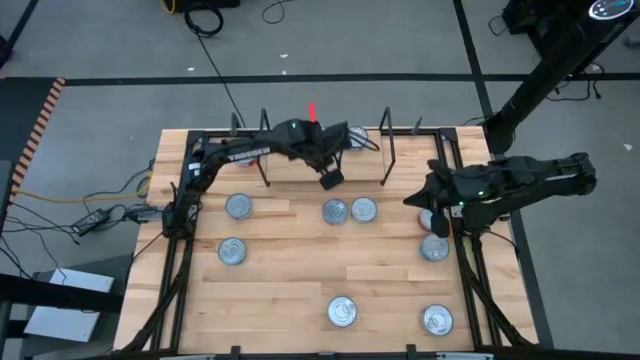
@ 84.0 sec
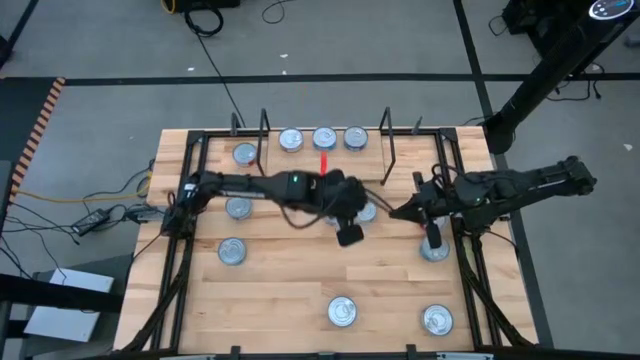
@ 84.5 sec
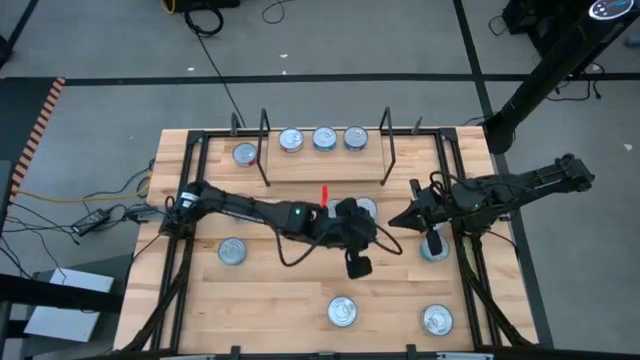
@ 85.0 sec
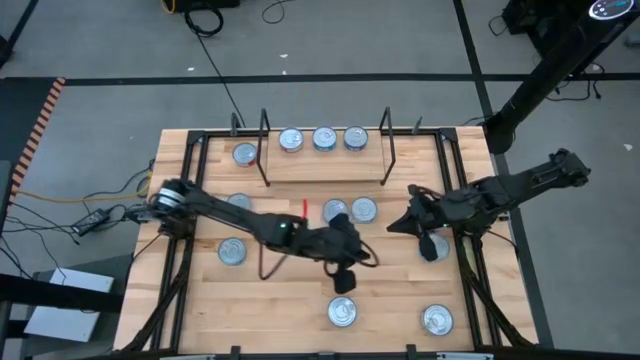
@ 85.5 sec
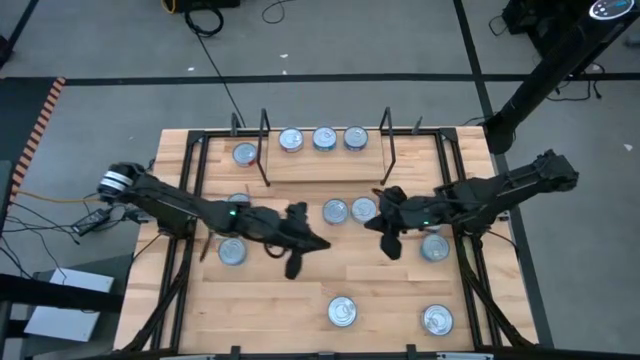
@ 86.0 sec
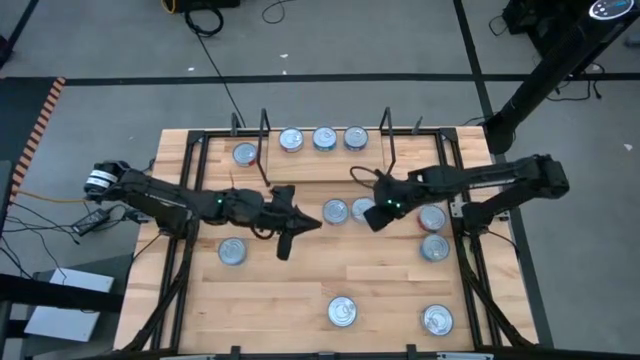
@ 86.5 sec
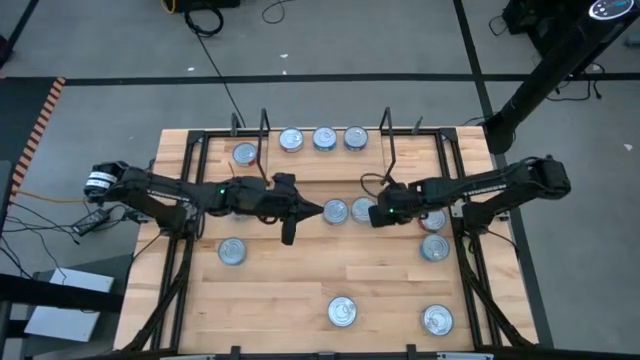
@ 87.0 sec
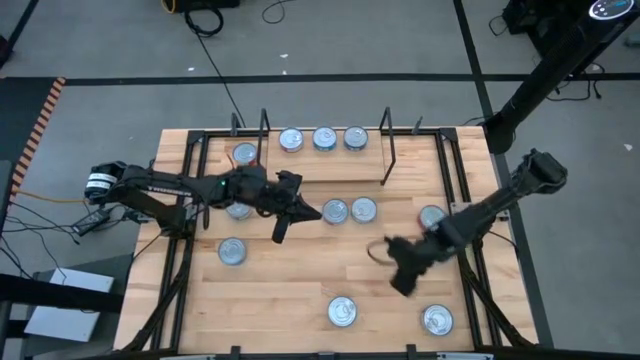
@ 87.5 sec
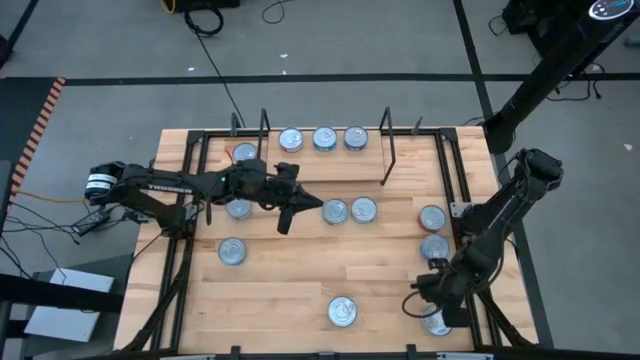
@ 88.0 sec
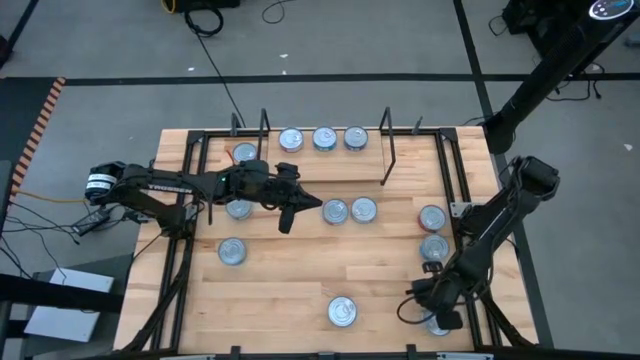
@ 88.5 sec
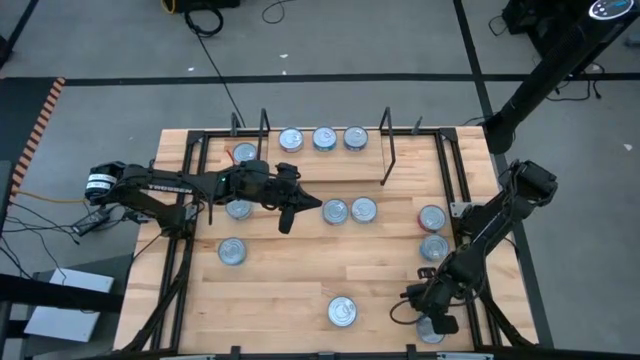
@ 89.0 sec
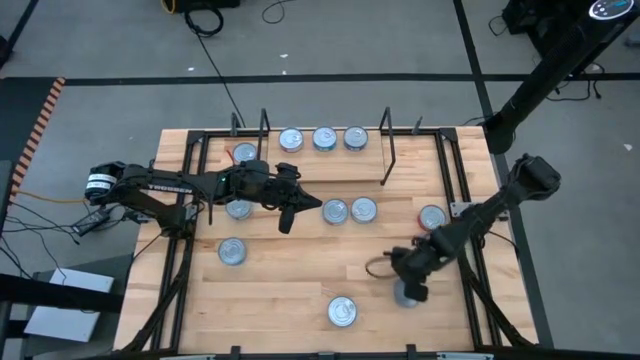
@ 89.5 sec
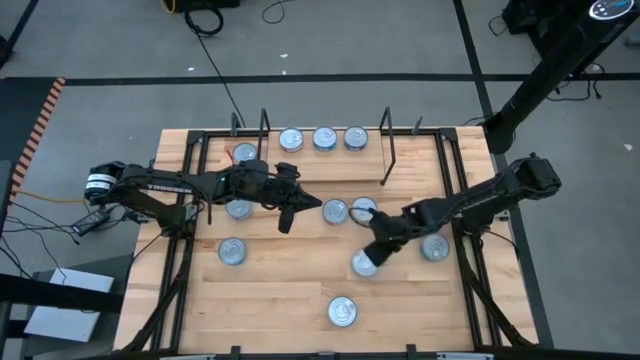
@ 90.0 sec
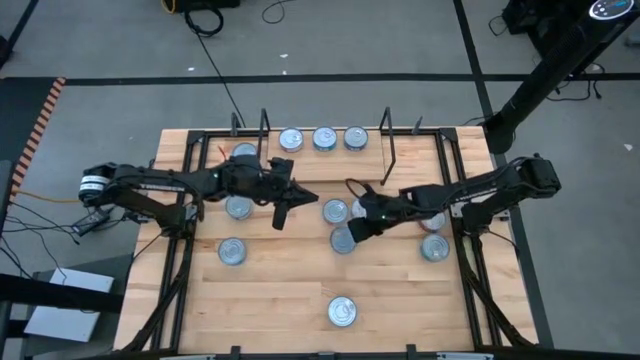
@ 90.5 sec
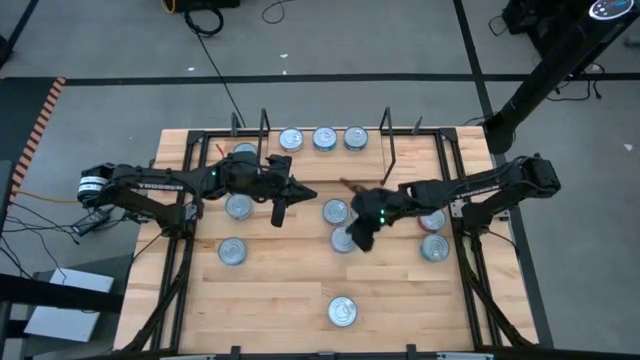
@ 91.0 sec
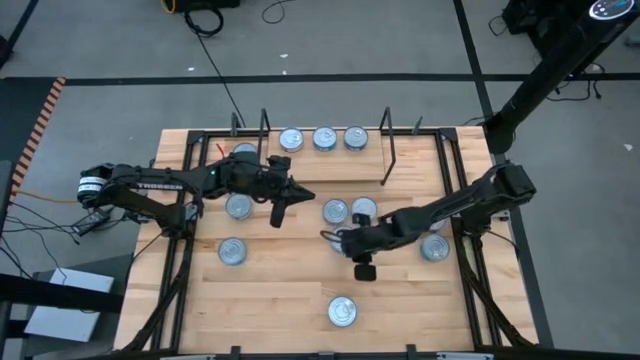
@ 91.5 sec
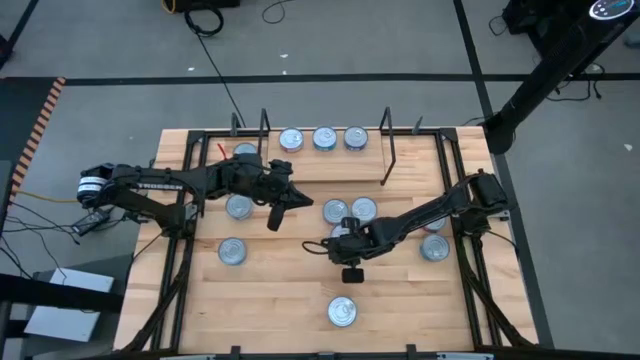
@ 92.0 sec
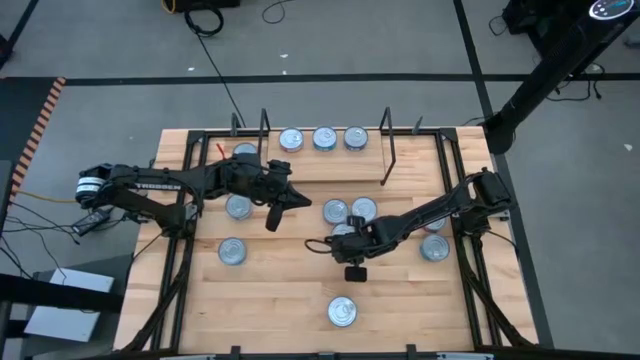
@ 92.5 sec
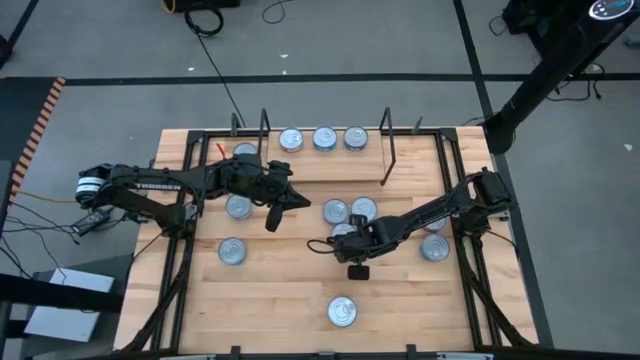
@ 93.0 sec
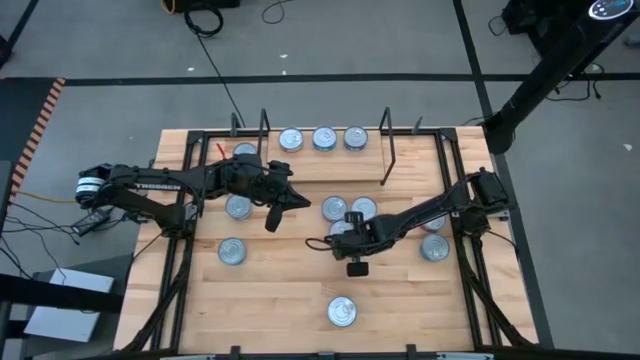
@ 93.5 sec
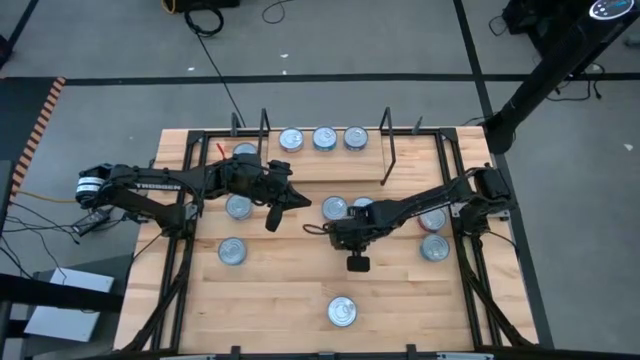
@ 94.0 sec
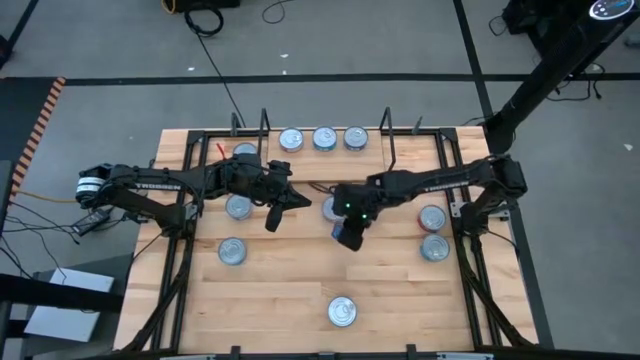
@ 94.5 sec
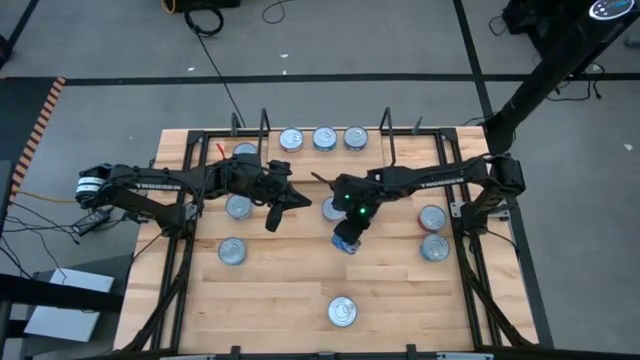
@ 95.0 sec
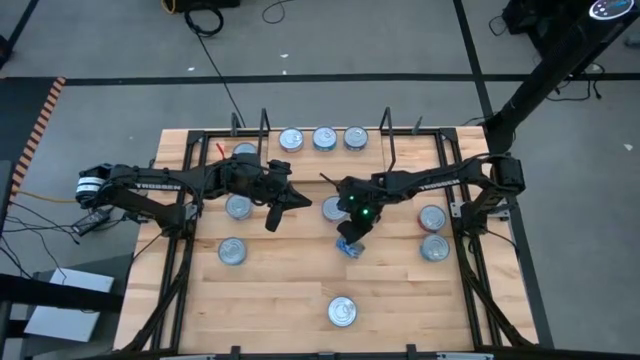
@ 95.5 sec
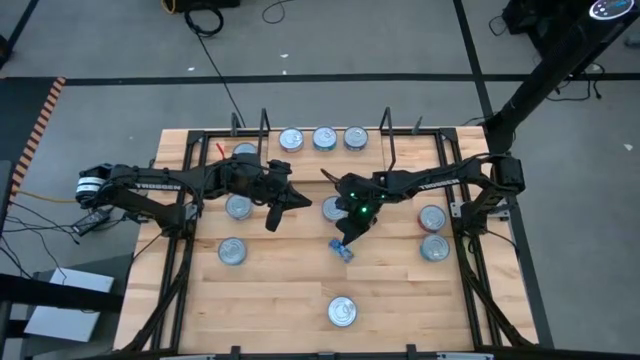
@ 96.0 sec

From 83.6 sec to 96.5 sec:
Task: Stack canned seafood by type on shelf
Put the blue tuna can on the shelf

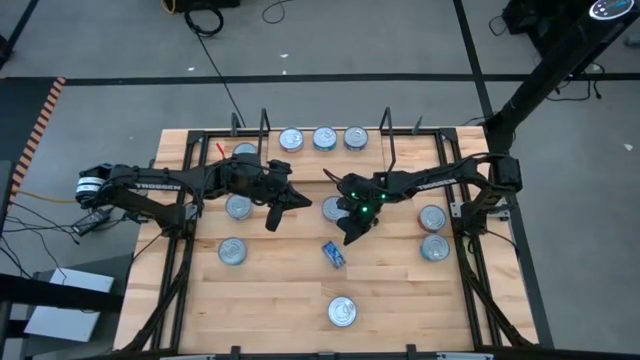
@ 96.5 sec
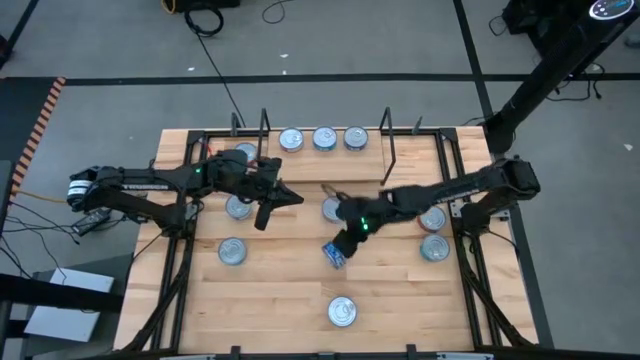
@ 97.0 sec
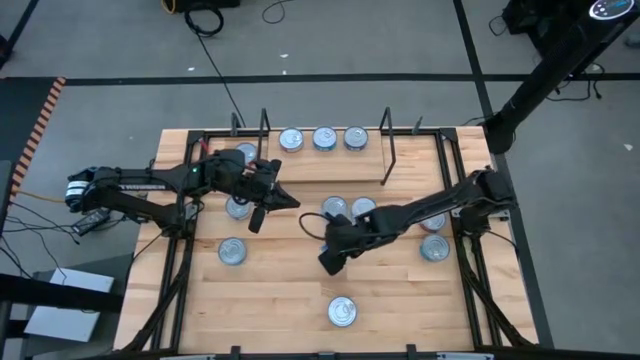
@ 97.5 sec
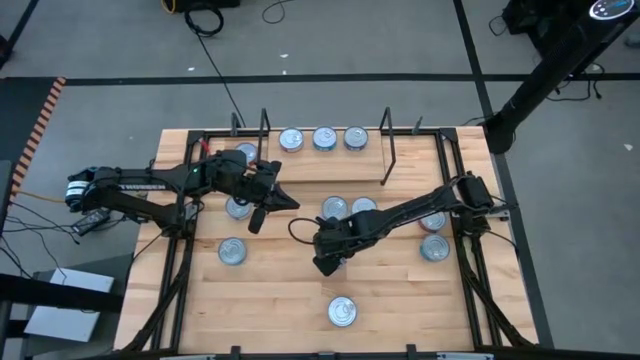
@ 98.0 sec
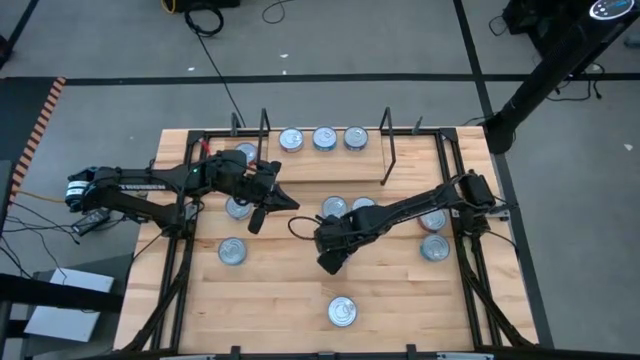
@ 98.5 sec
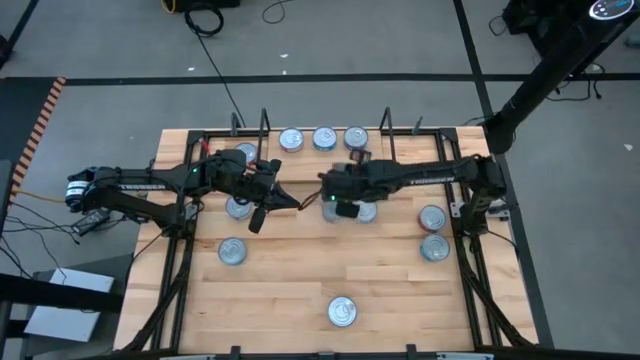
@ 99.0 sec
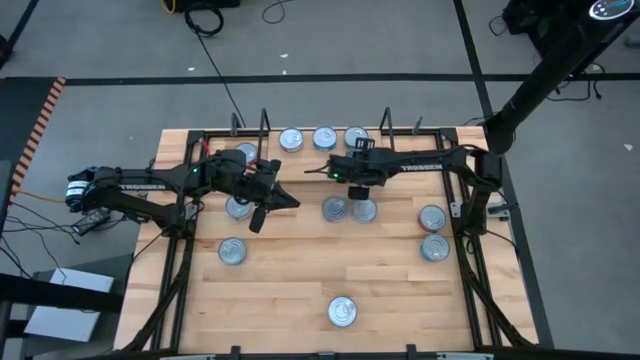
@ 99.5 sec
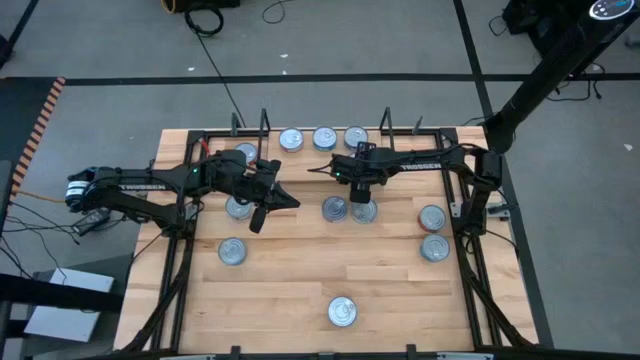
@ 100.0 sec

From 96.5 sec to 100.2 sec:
Put the blue tuna can on the shelf

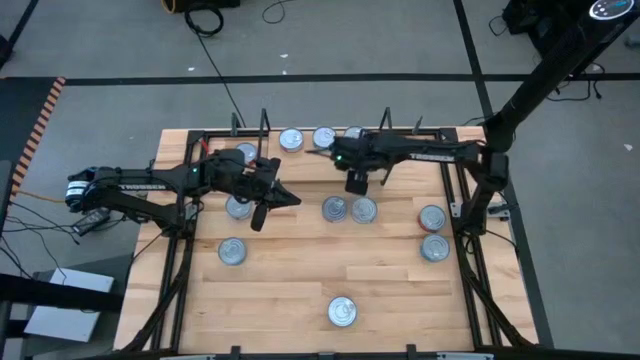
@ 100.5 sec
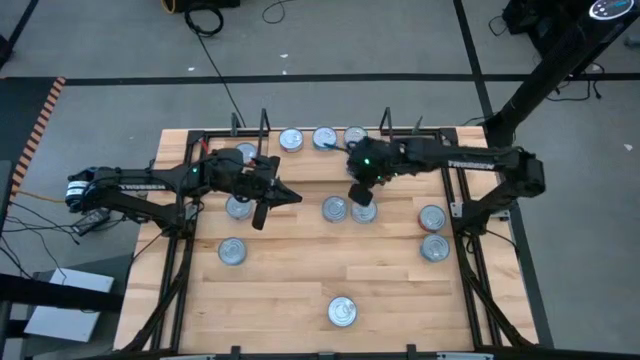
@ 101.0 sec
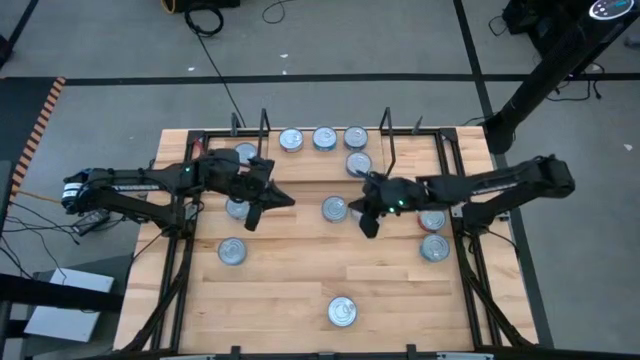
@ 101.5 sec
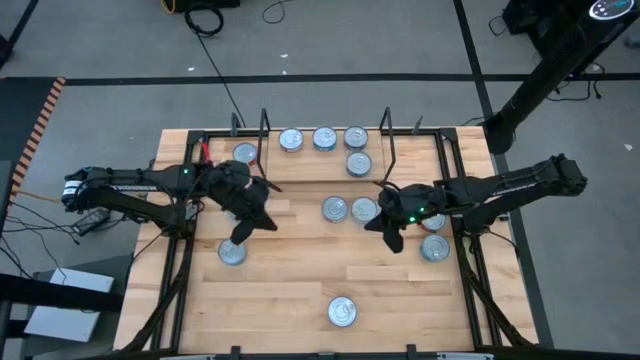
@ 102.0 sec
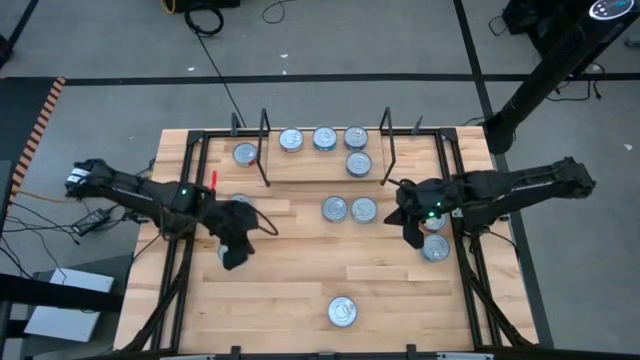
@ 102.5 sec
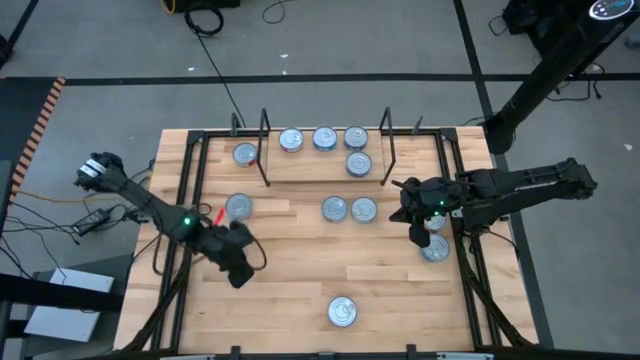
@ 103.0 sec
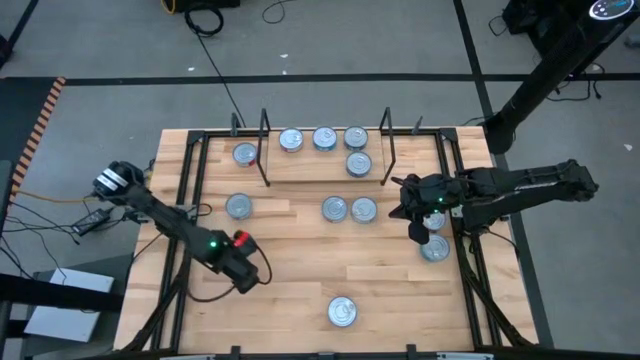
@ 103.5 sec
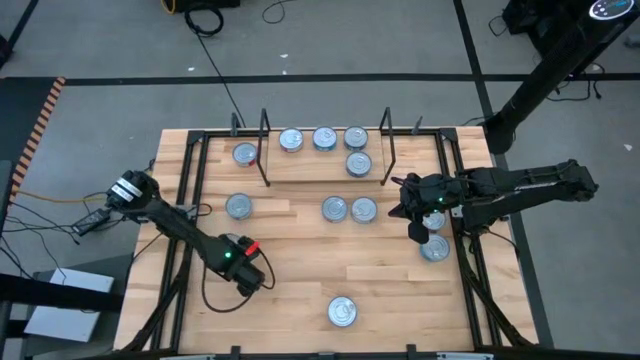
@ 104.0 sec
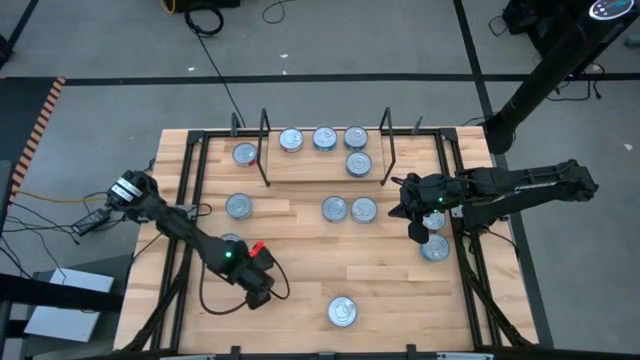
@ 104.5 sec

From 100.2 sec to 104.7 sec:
Put the light blue tuna can on the shelf

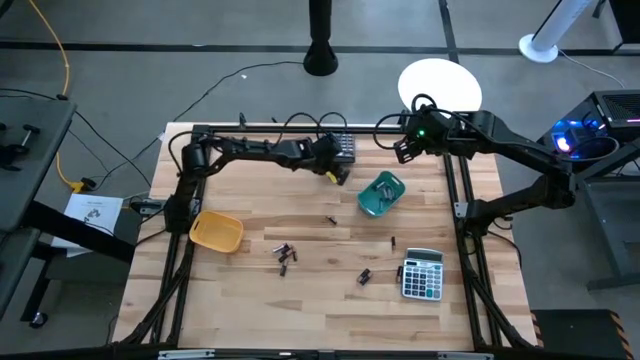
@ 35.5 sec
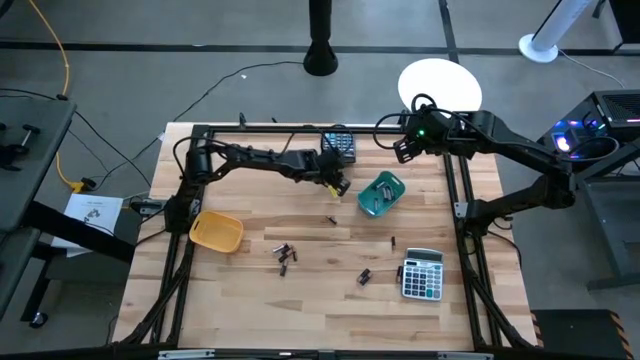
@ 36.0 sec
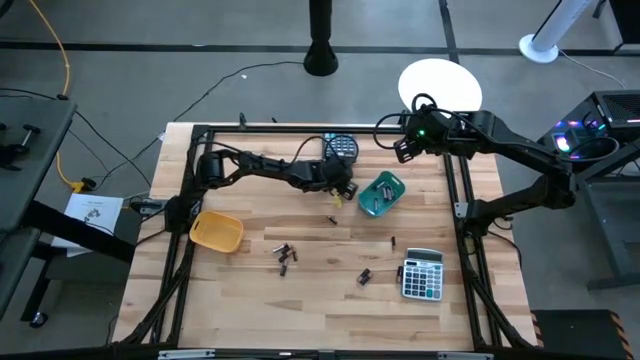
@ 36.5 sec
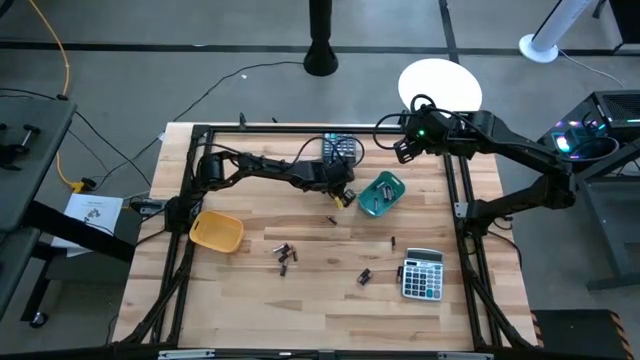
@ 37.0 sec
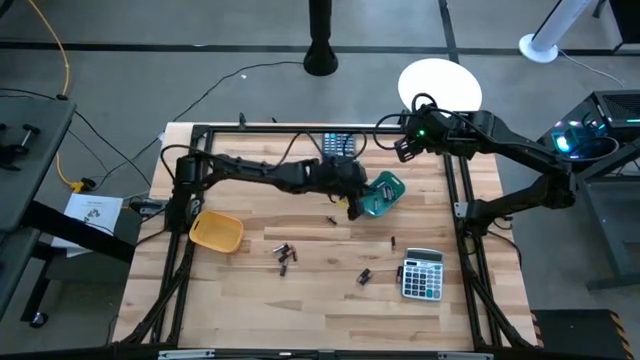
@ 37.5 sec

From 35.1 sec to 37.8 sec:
Task: Sort batteries
Put the silver battery into the green bin
